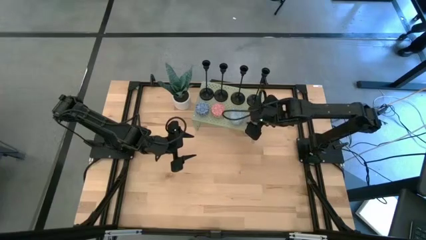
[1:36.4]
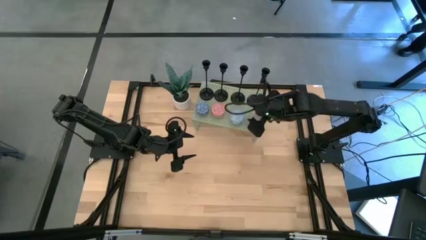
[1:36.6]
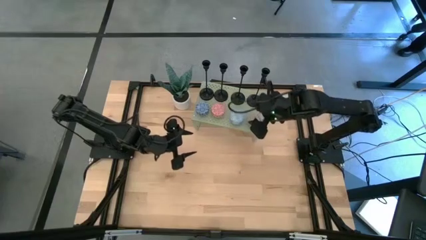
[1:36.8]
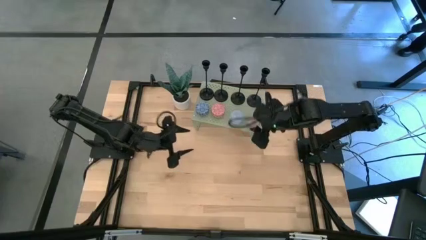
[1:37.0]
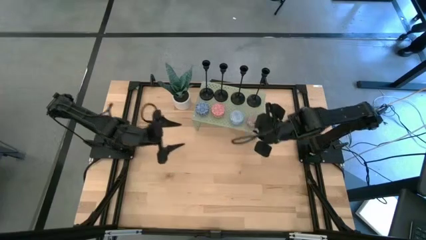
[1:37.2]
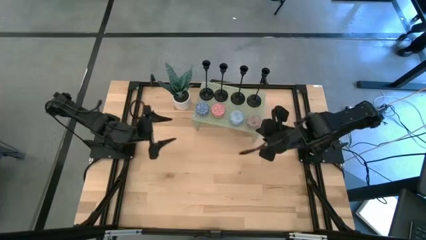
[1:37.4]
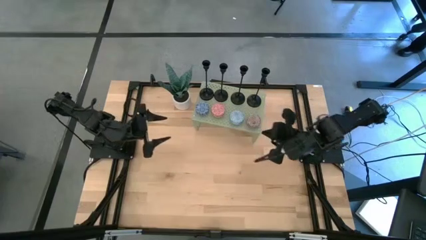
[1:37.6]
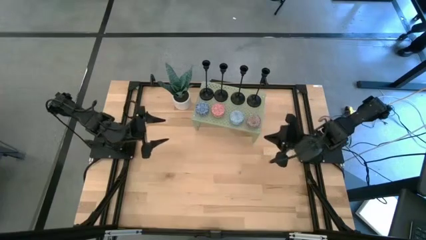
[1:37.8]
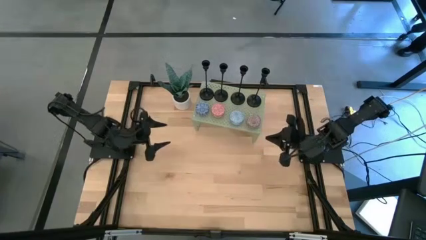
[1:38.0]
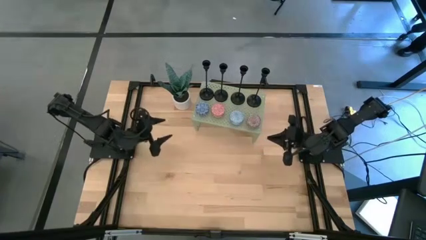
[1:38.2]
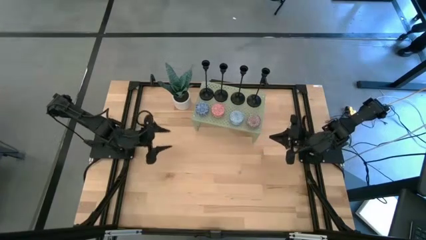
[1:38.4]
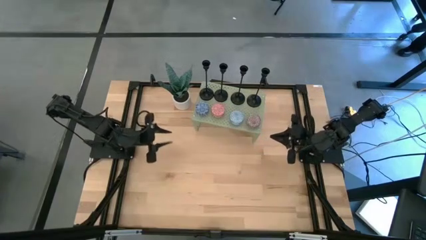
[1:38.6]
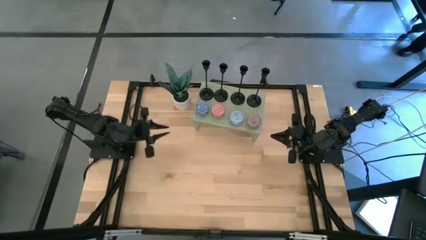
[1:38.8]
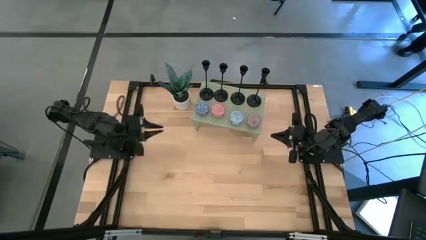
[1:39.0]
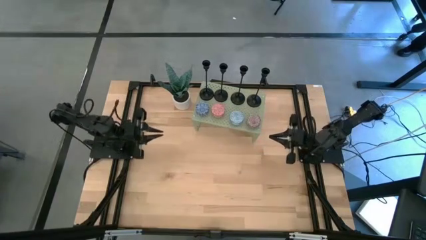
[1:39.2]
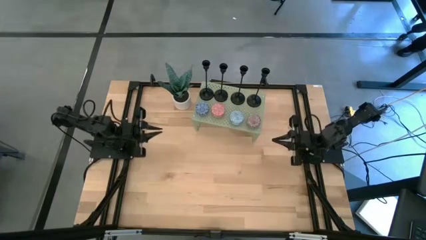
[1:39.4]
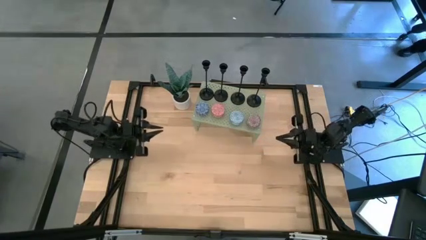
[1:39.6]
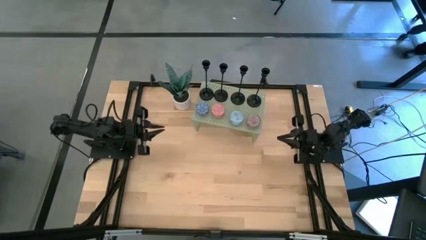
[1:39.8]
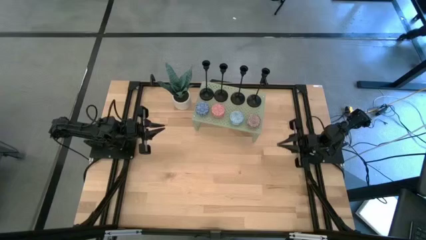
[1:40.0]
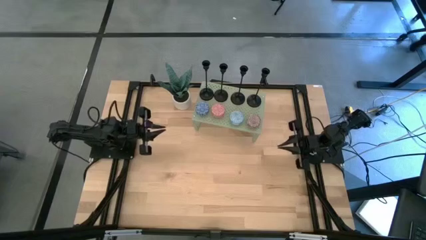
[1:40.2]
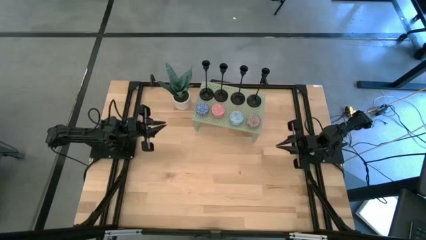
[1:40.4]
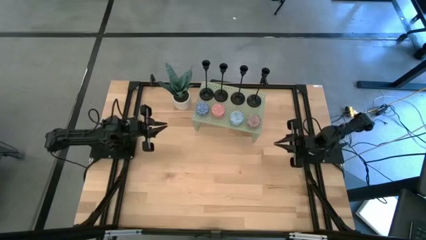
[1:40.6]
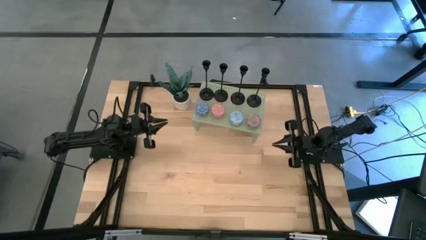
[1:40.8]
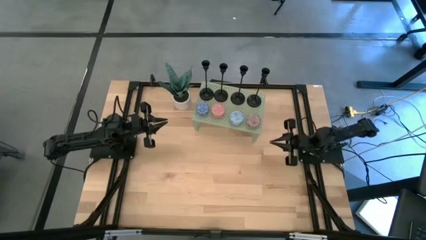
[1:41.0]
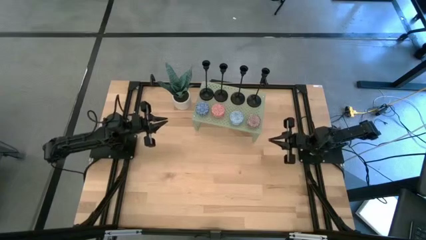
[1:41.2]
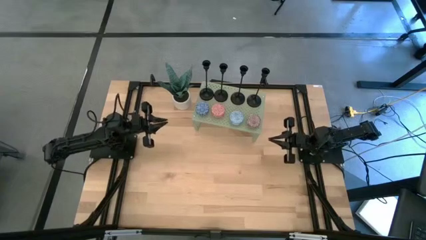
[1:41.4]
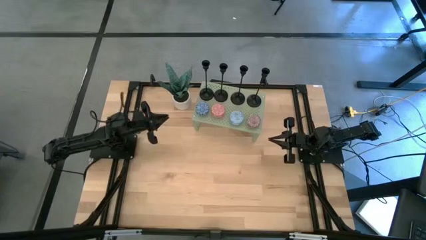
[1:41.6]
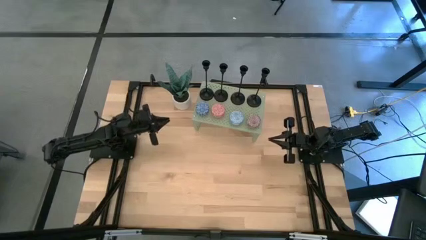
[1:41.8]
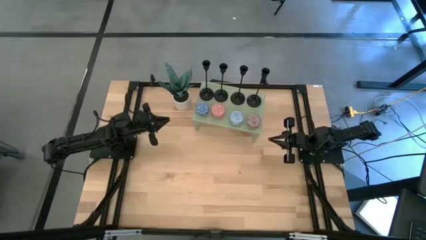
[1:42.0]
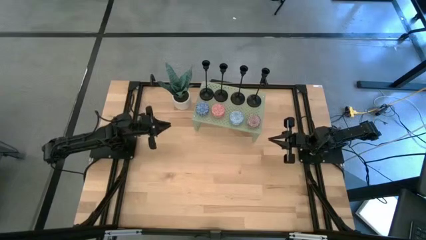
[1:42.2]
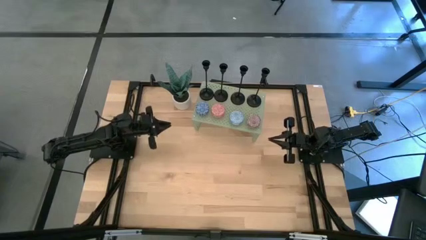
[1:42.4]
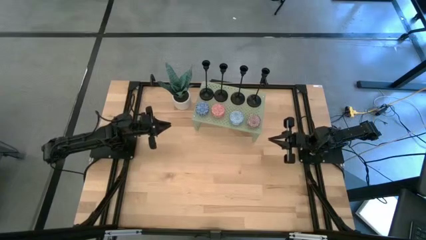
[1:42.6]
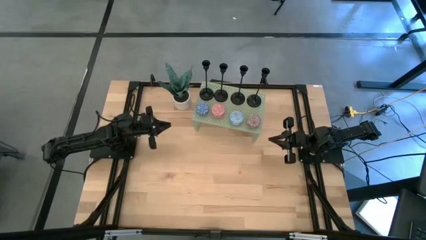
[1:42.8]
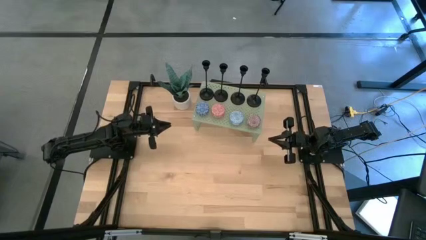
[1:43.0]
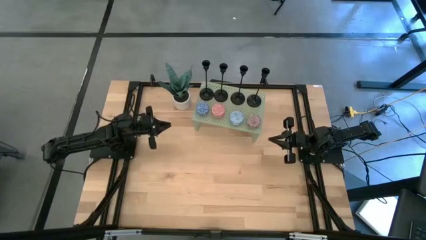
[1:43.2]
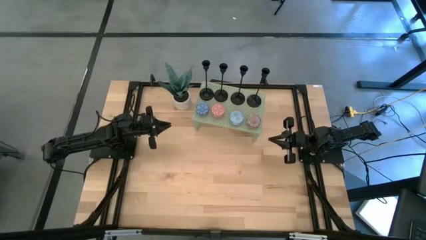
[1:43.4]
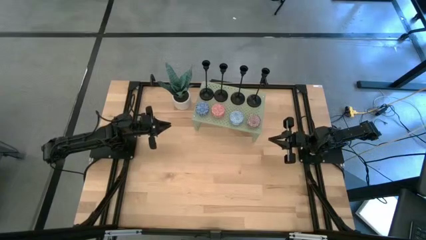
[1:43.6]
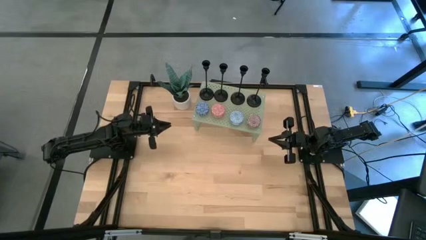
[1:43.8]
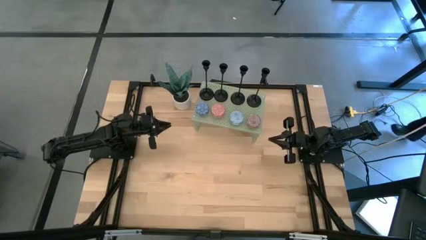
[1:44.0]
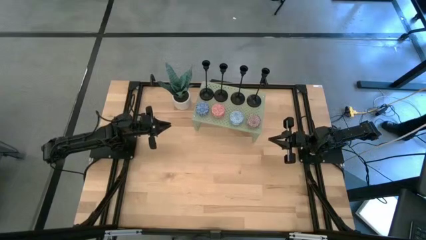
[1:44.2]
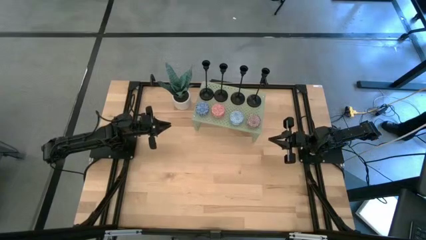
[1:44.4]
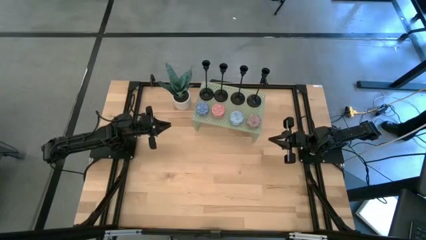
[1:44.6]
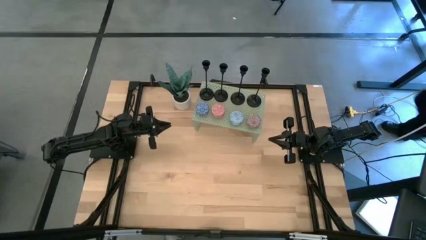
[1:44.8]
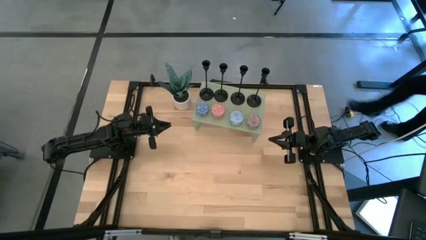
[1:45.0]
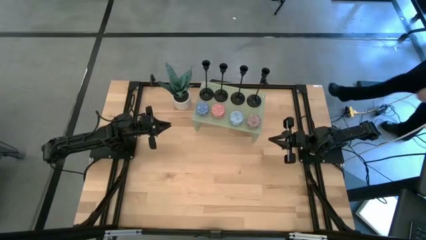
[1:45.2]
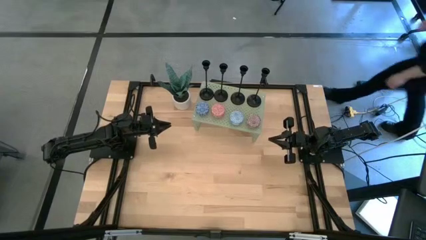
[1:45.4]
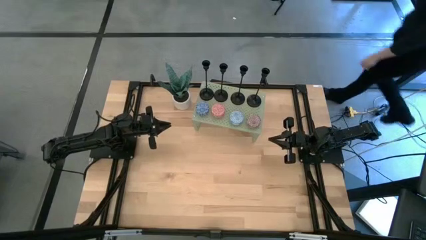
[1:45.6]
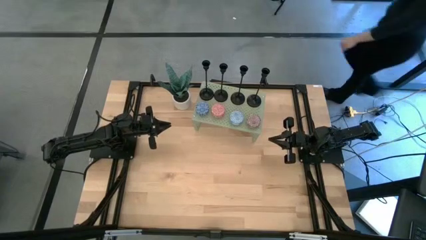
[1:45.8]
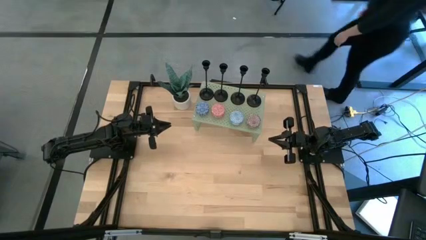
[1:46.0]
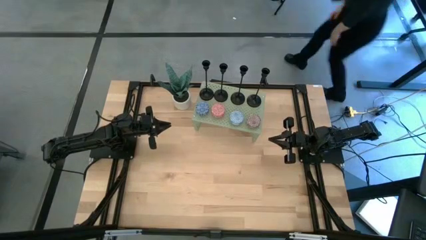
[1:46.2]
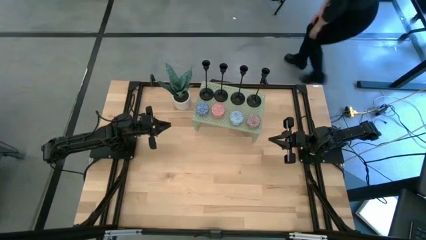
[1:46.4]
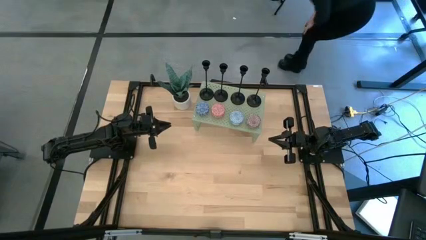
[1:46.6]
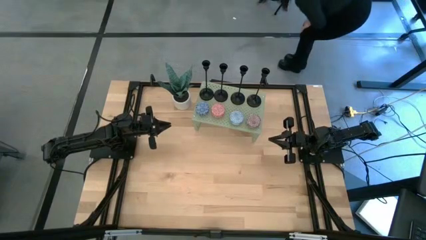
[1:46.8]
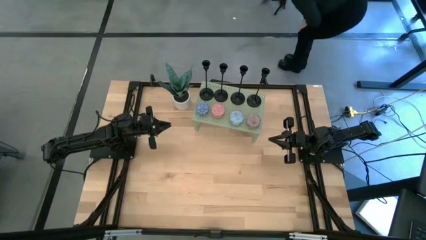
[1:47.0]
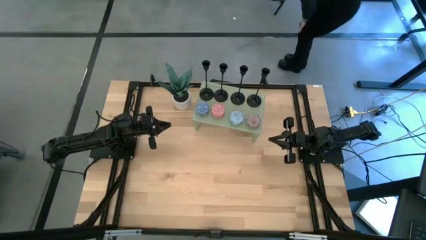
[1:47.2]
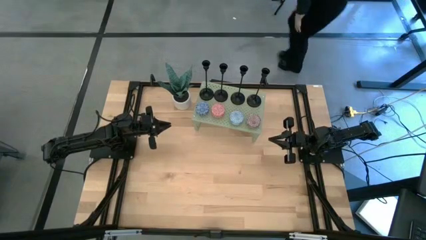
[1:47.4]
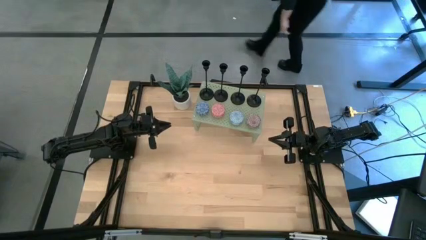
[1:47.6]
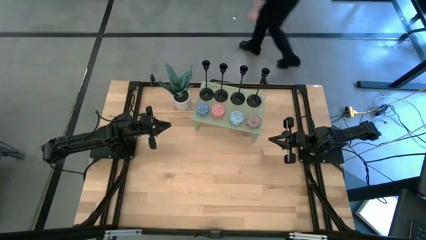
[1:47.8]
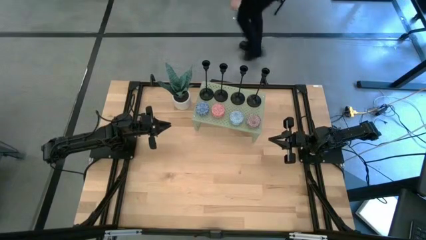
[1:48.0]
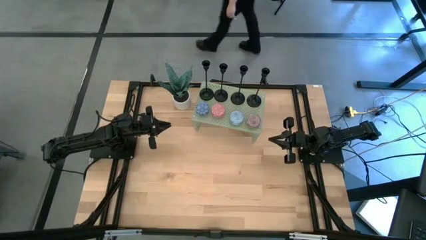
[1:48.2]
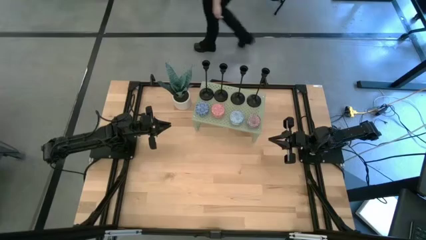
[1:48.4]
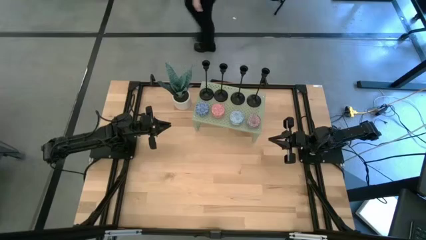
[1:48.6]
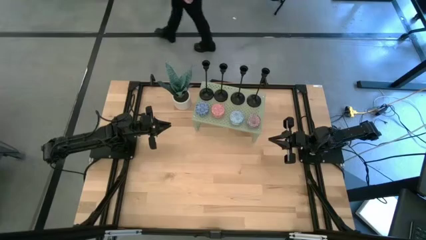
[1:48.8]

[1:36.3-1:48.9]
Task: Pick & Place candle stick holders
Return to Home Position

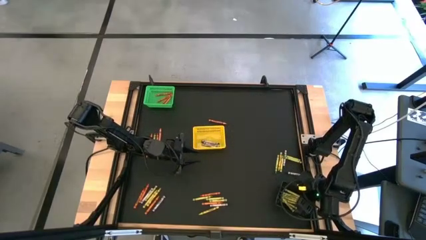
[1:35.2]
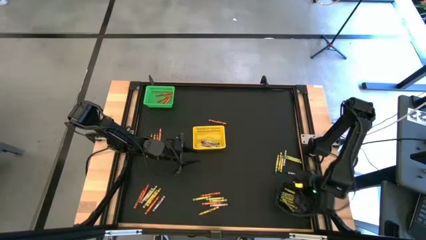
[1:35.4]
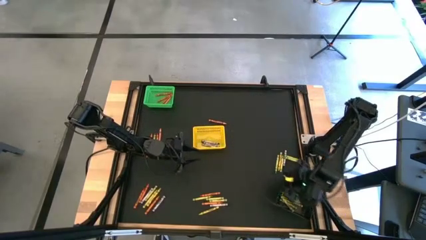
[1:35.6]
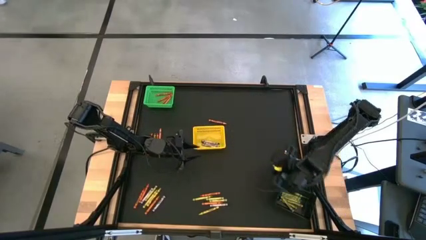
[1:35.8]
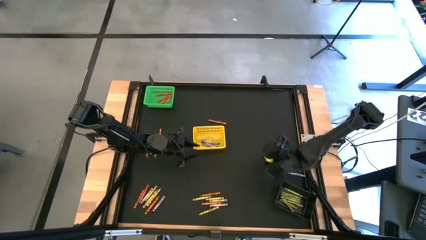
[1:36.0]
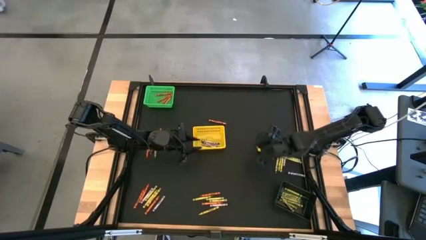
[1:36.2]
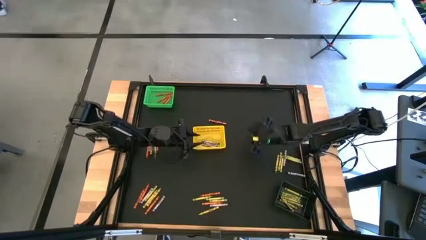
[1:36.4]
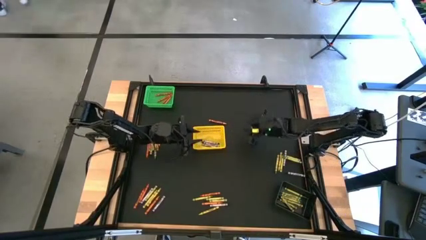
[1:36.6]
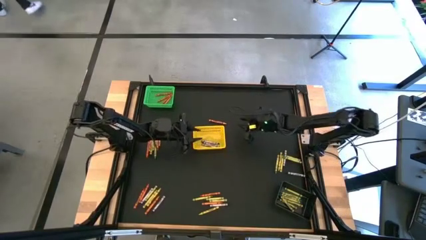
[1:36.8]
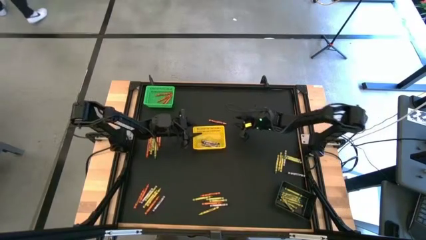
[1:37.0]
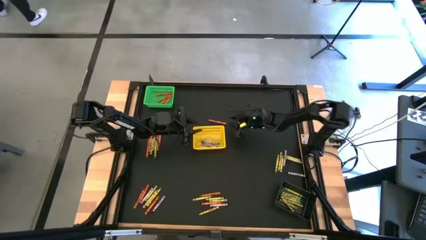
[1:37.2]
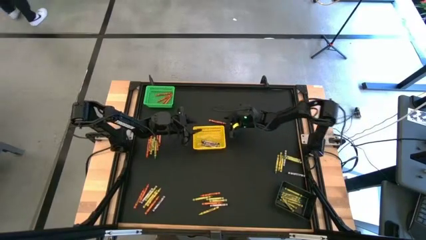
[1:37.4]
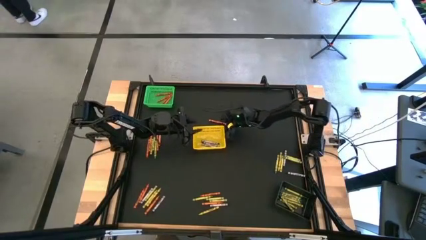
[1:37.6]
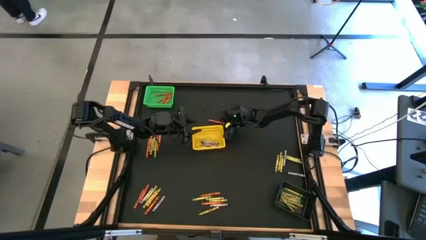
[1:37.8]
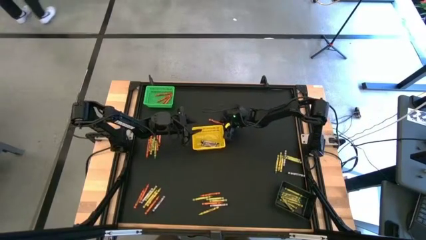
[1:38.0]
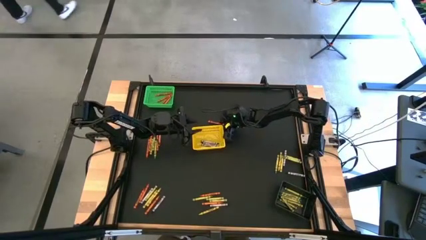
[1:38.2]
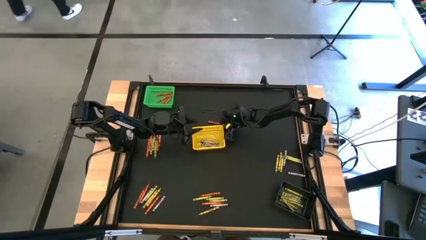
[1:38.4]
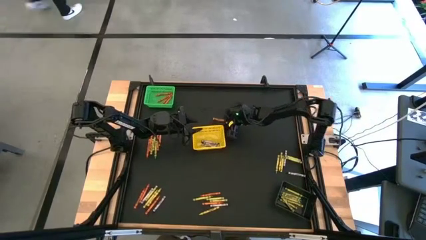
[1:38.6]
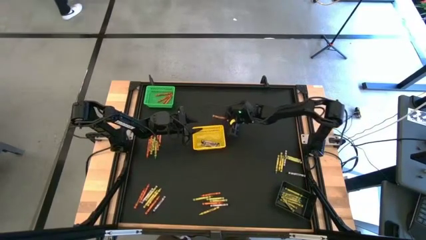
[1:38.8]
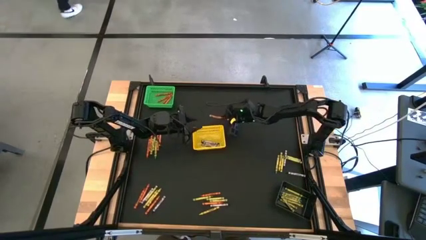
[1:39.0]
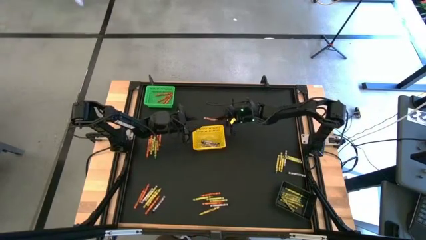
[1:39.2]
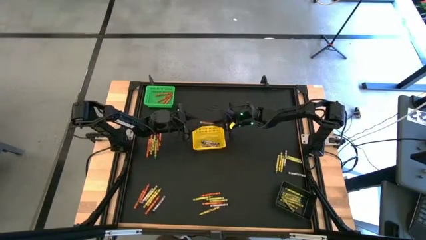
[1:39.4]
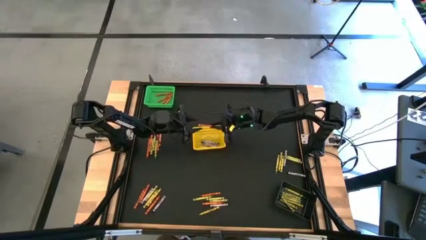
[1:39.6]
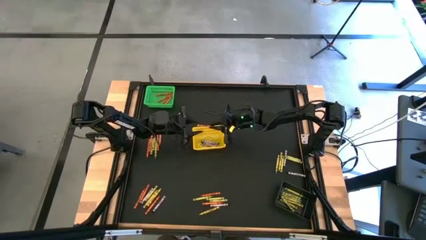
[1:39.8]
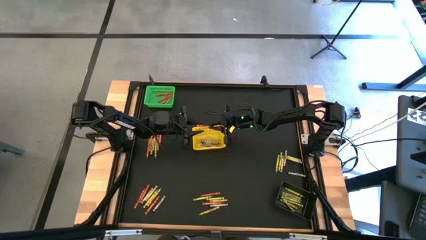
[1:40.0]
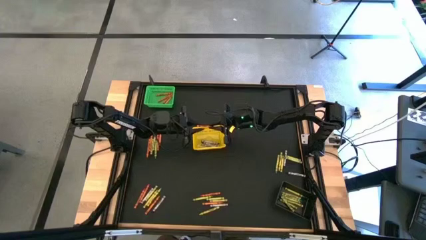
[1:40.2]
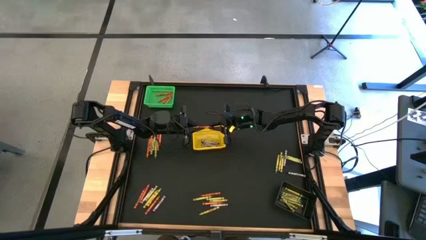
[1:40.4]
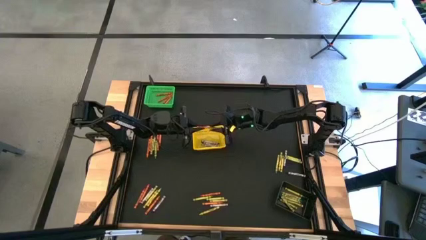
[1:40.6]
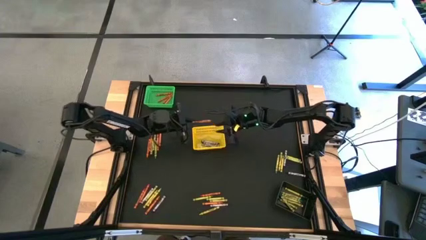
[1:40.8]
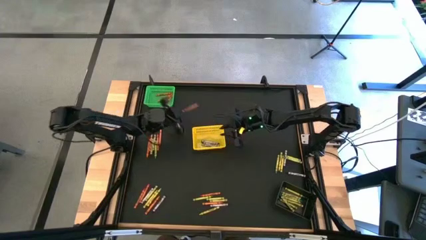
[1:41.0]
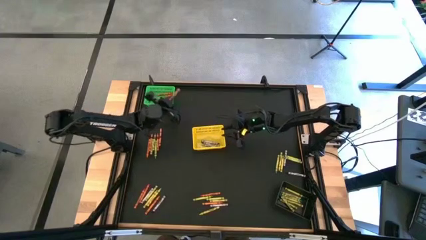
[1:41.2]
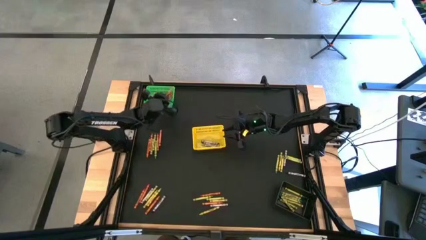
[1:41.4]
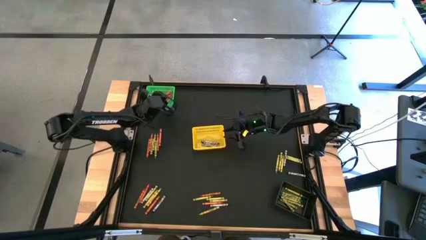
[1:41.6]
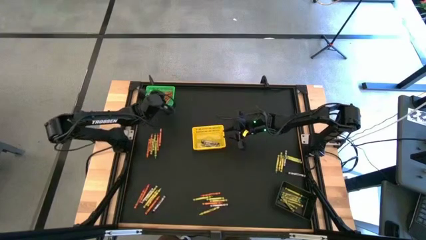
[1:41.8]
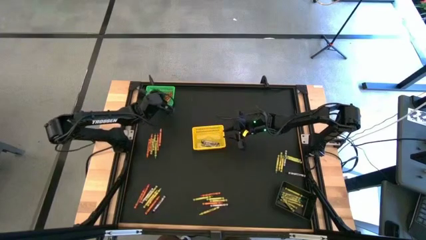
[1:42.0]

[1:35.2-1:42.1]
Task: Sort crayons
Put the orange crayon into the green bin
